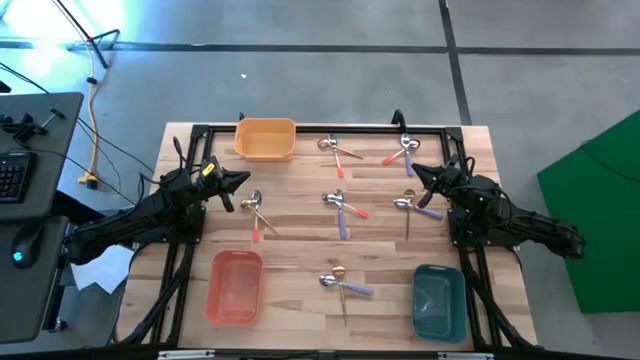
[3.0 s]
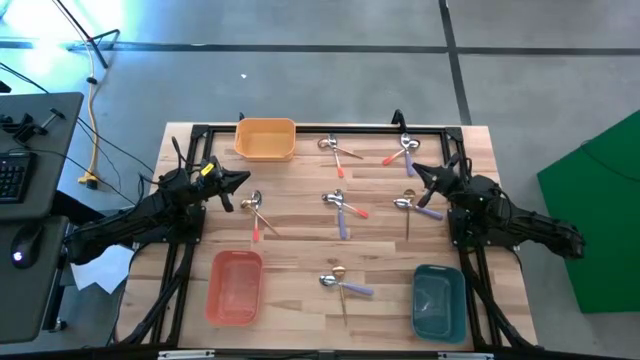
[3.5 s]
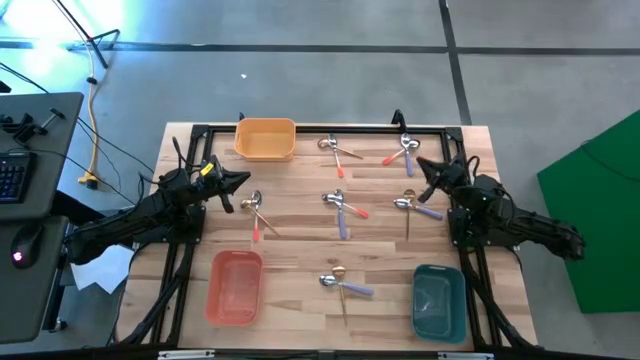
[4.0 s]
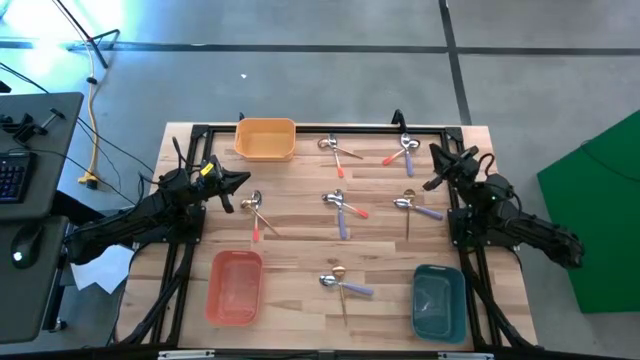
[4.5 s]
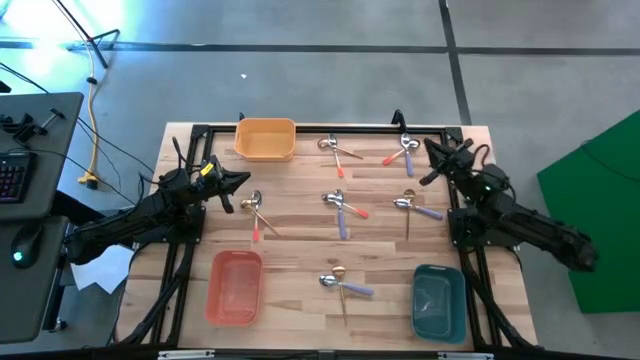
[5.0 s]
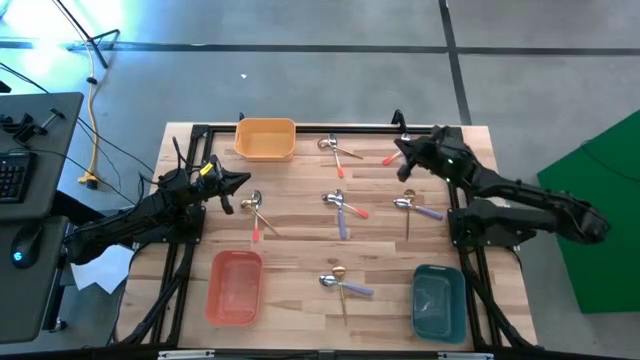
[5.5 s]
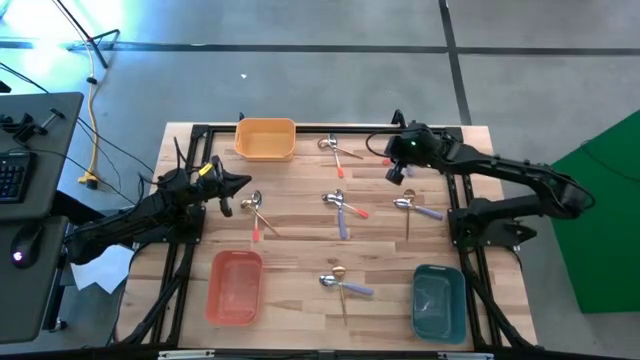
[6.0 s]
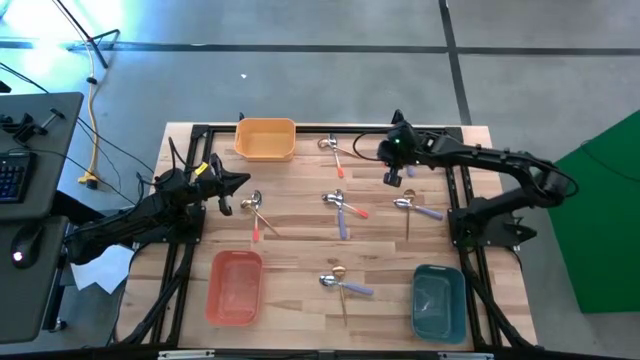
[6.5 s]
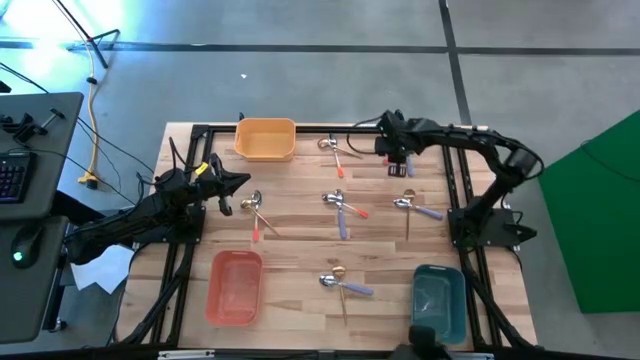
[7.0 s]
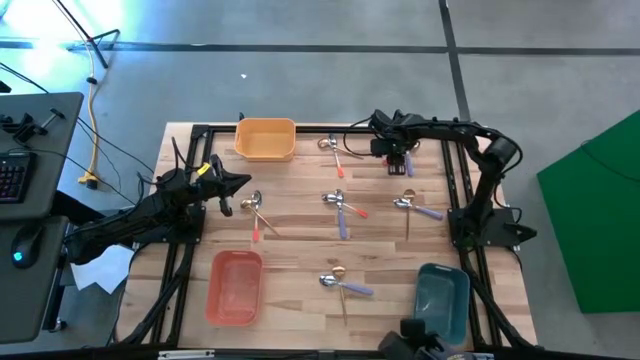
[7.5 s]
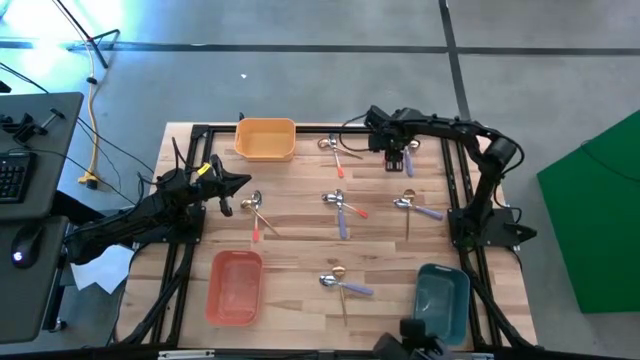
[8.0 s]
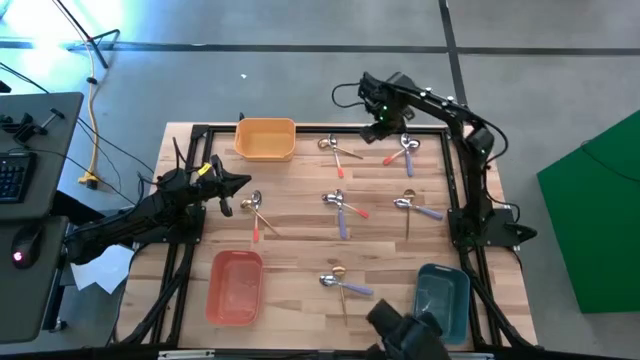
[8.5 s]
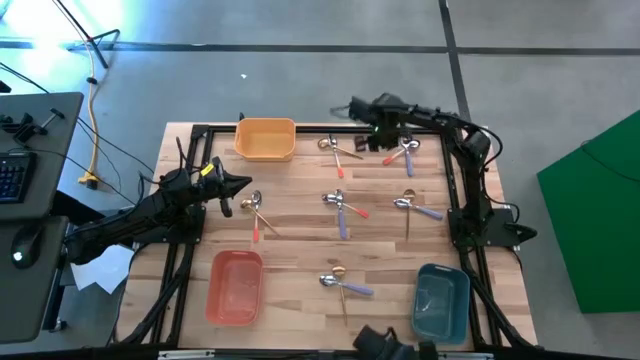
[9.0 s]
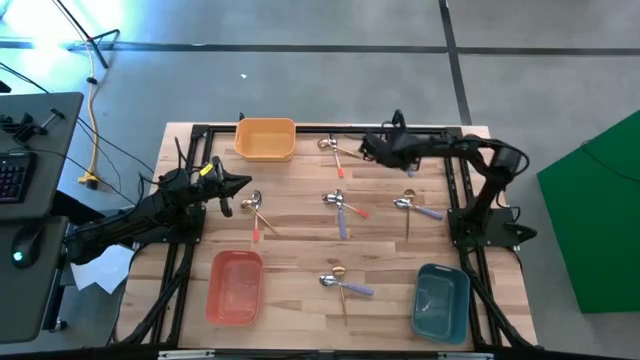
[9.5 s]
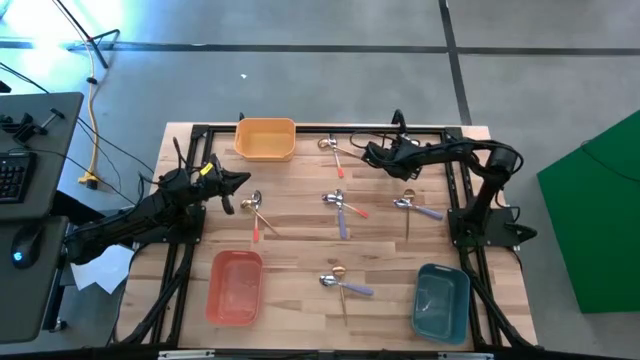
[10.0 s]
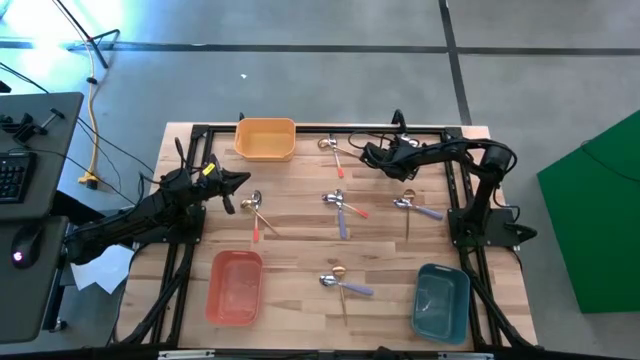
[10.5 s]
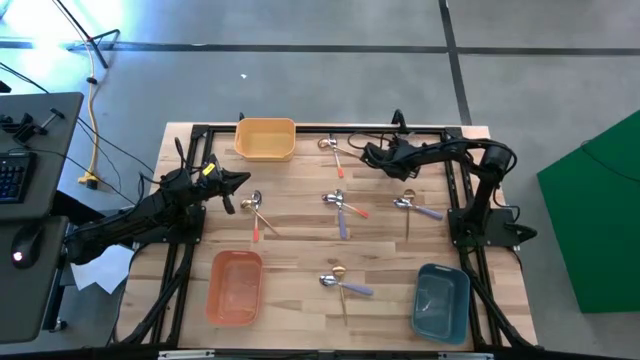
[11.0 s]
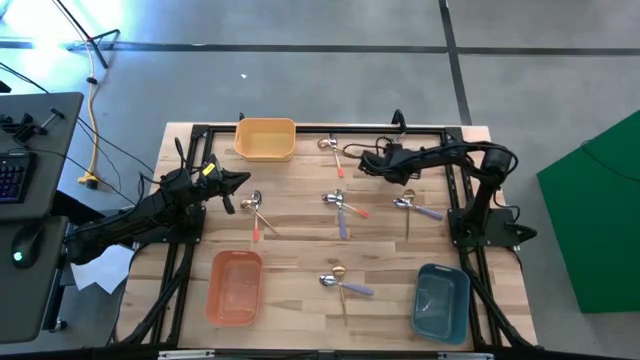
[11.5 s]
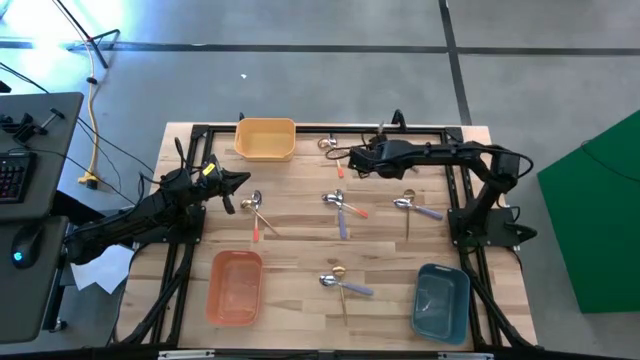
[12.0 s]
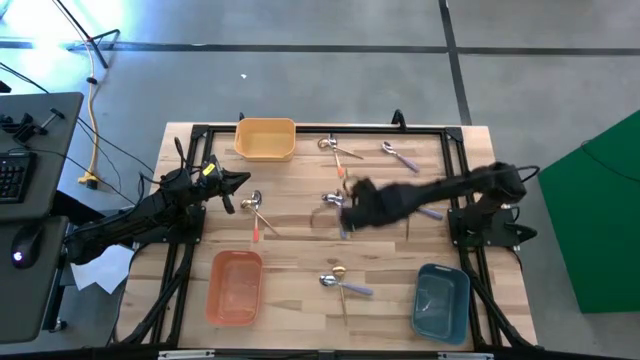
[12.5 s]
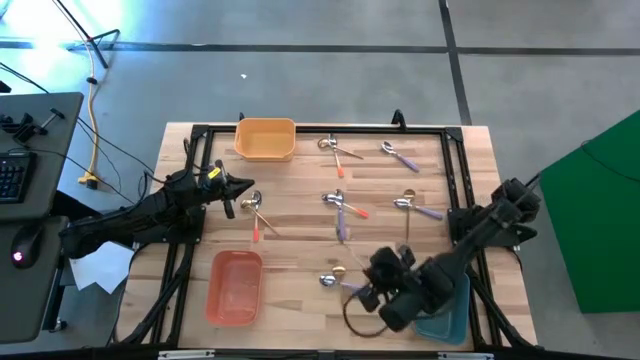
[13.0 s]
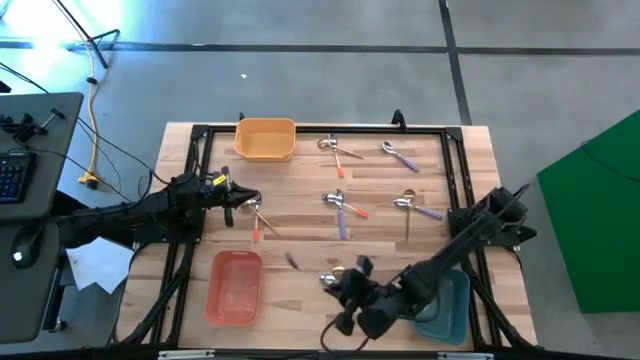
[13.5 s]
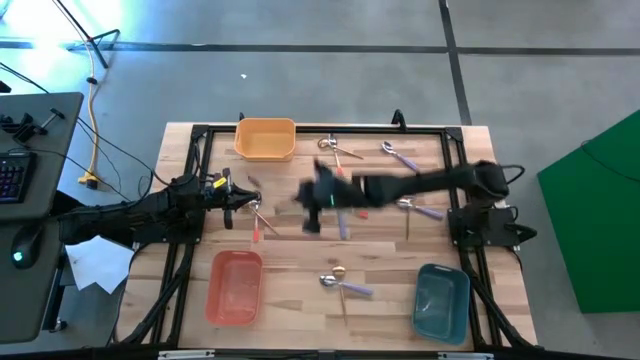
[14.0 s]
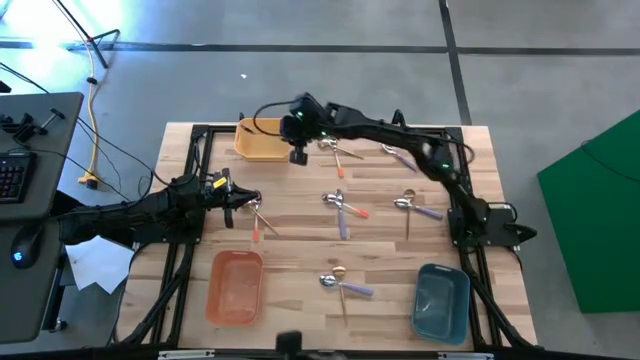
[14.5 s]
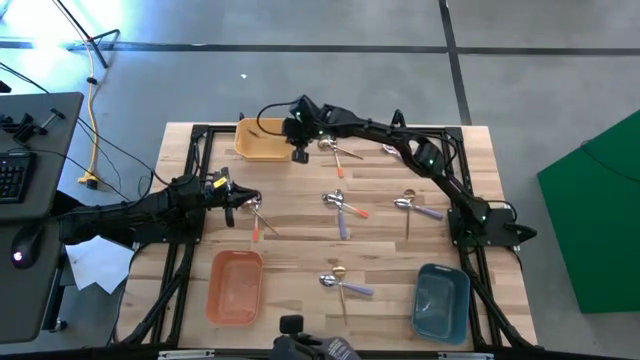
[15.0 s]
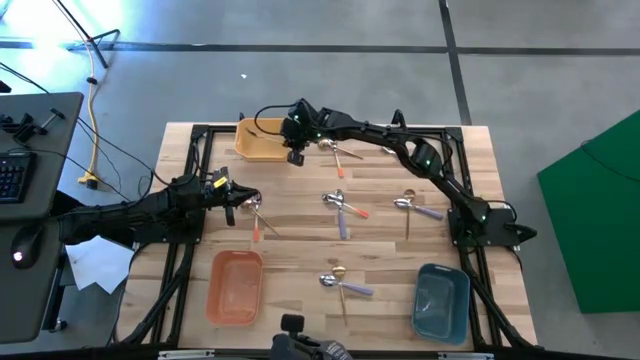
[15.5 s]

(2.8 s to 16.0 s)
Task: Sort silverware by color (type)
Put the top right orange spoon into the yellow bin

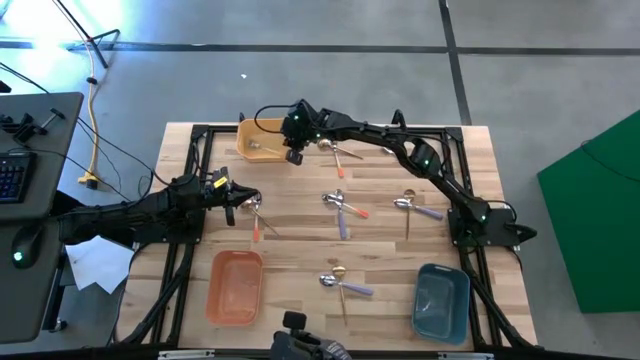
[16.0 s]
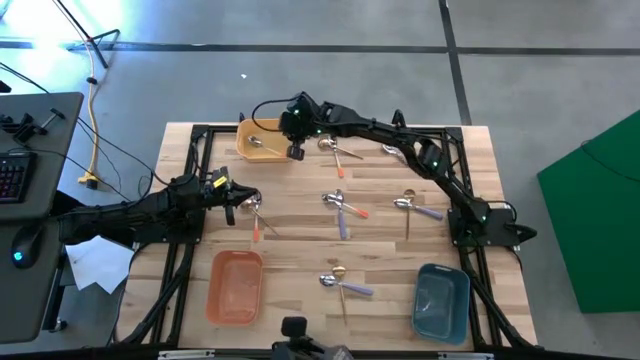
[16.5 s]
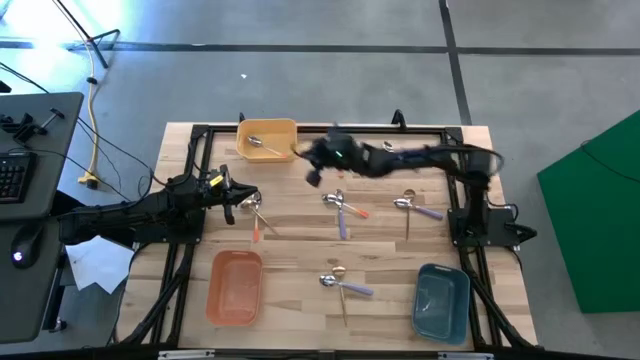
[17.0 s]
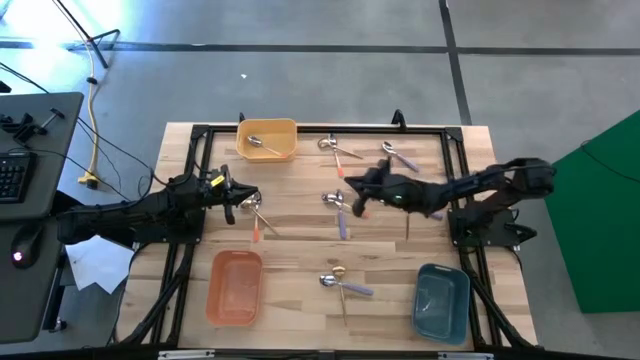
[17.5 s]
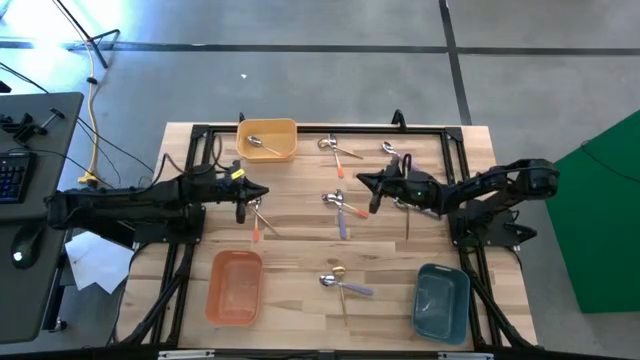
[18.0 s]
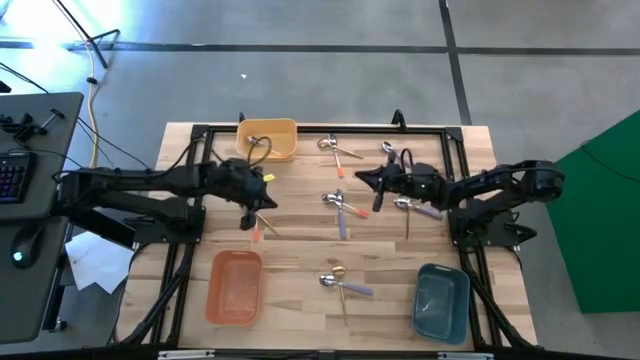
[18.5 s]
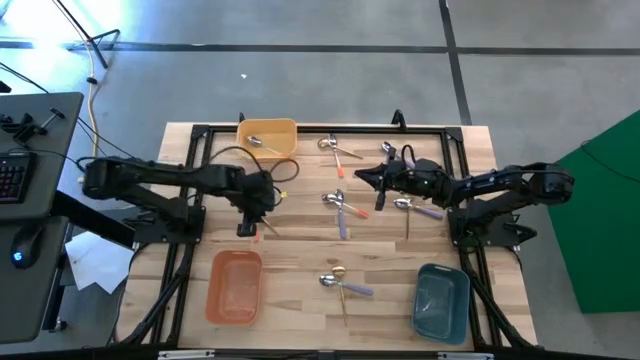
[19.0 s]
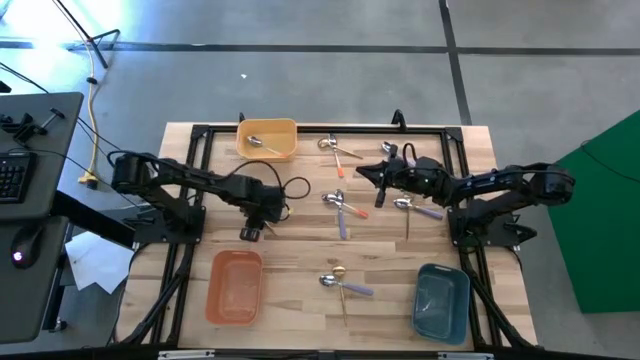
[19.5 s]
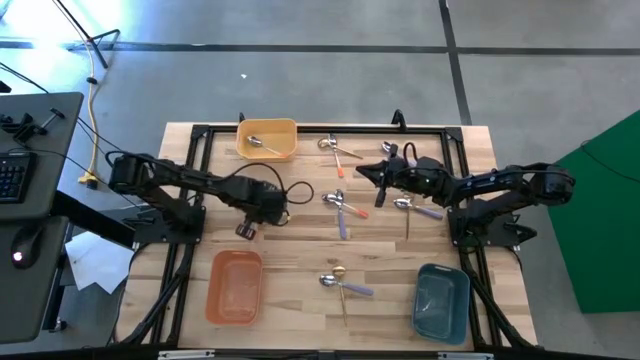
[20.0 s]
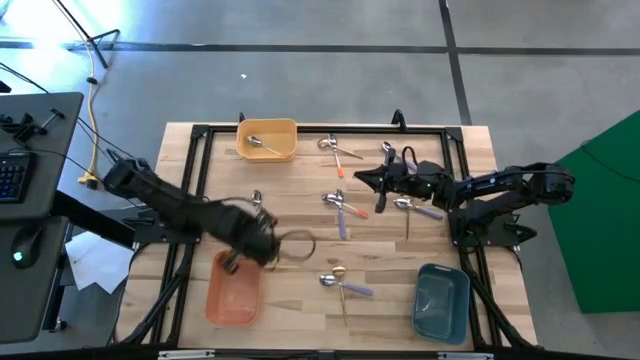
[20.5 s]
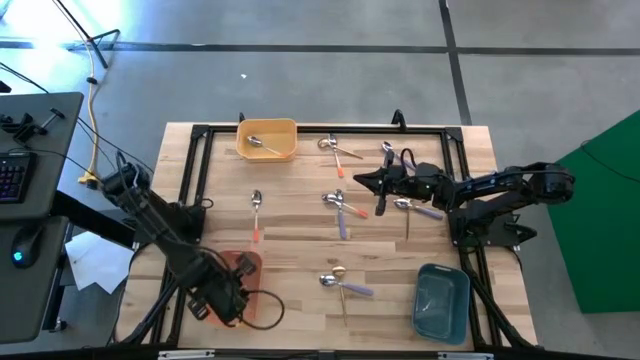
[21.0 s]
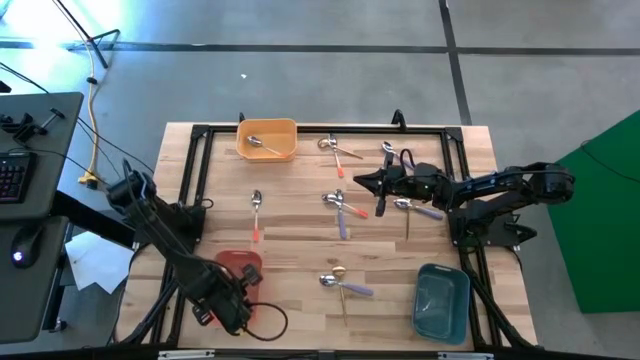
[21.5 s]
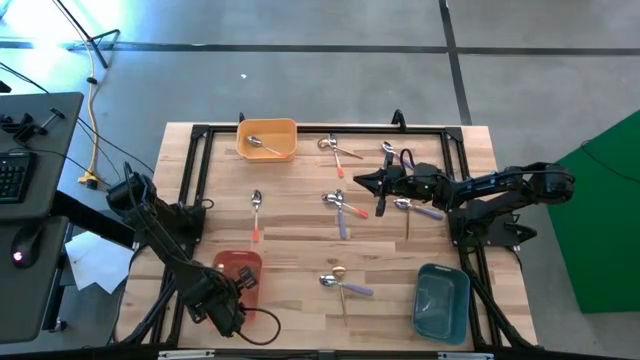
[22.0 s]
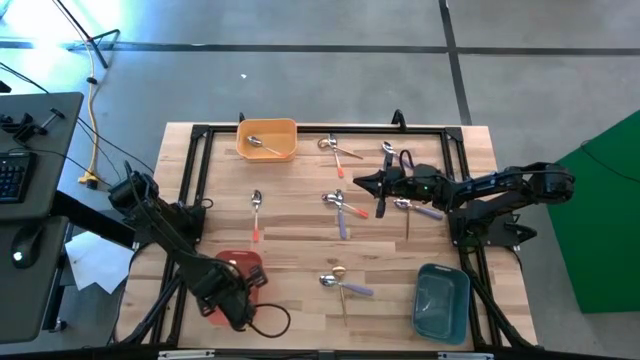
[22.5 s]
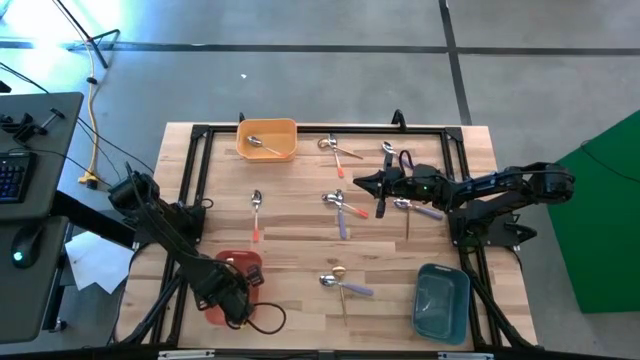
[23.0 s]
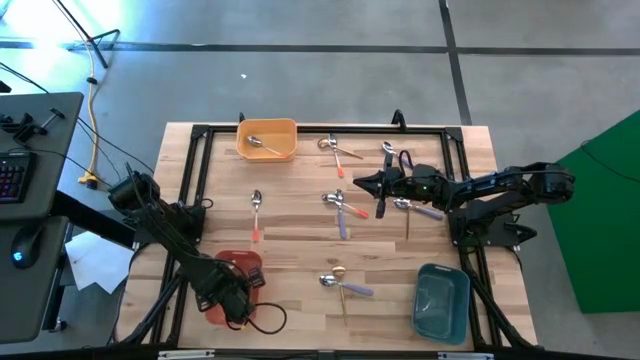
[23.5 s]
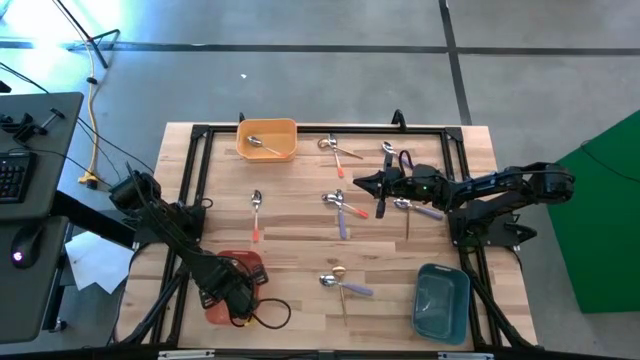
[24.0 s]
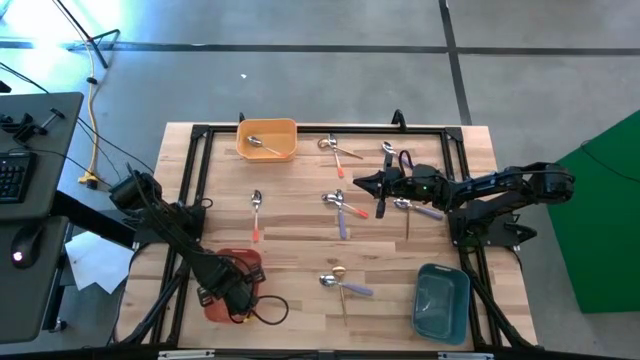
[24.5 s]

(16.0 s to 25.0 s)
Put the middle left gold spoon into the orange bin
